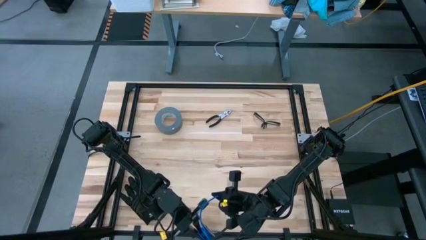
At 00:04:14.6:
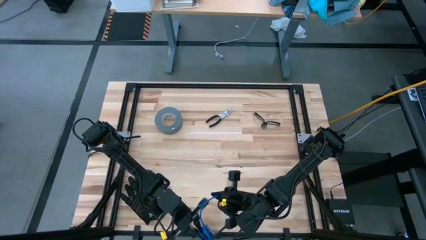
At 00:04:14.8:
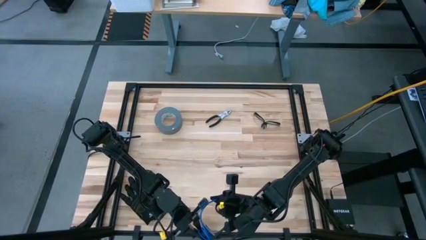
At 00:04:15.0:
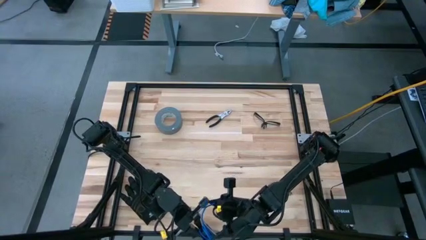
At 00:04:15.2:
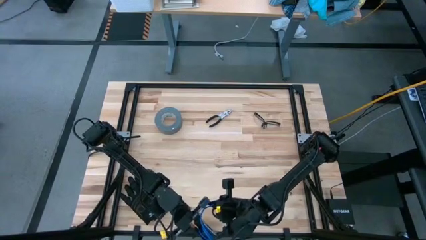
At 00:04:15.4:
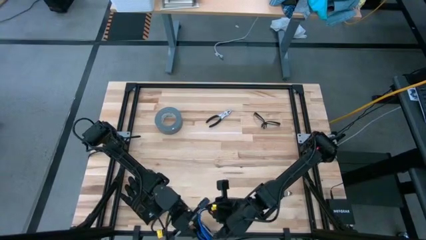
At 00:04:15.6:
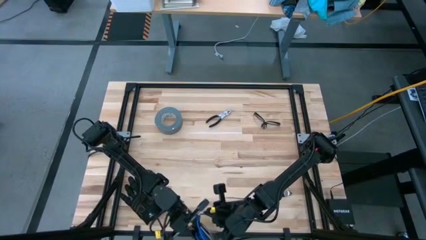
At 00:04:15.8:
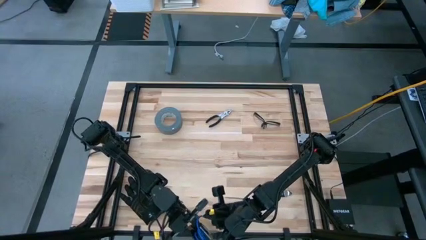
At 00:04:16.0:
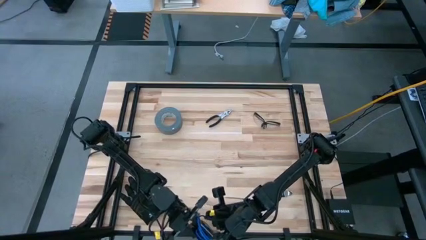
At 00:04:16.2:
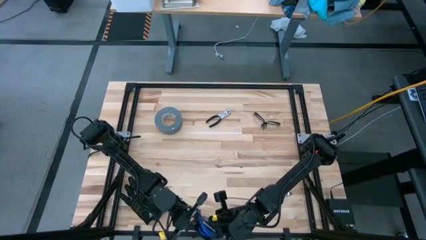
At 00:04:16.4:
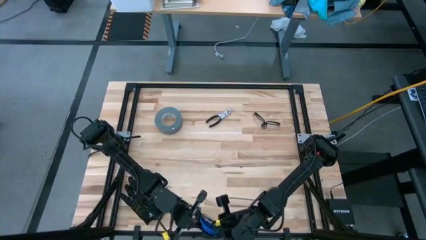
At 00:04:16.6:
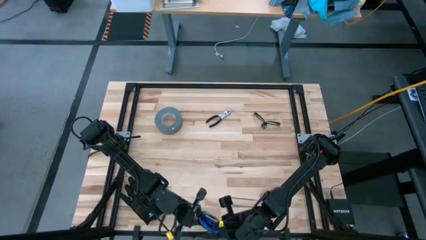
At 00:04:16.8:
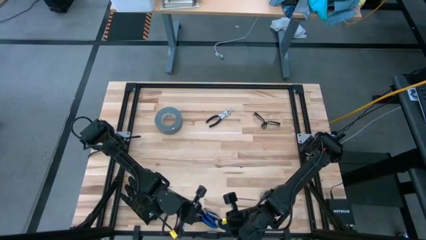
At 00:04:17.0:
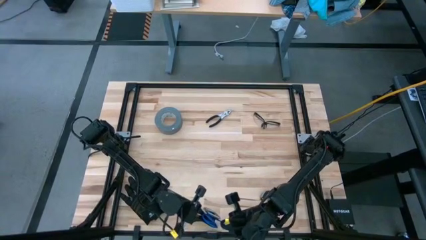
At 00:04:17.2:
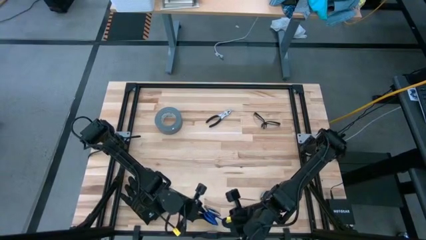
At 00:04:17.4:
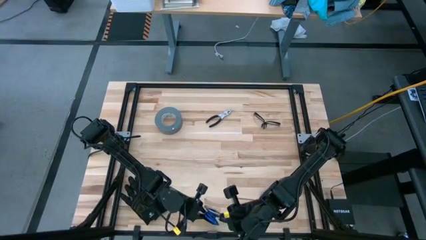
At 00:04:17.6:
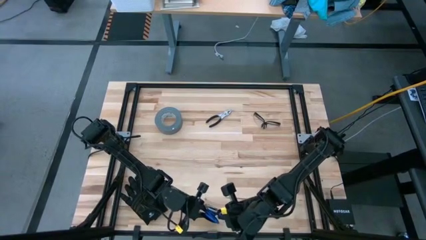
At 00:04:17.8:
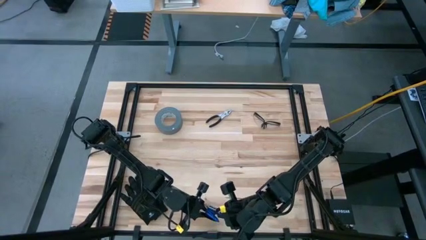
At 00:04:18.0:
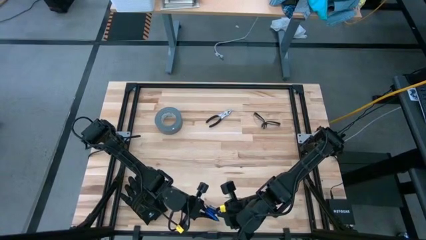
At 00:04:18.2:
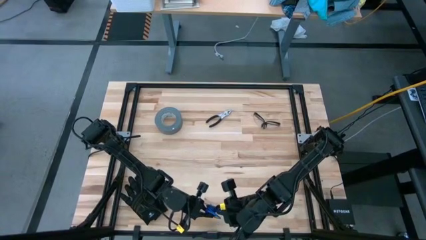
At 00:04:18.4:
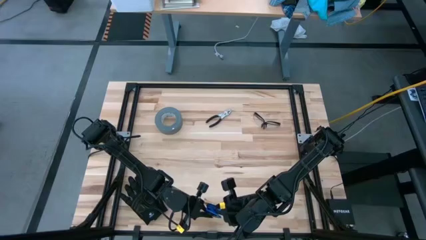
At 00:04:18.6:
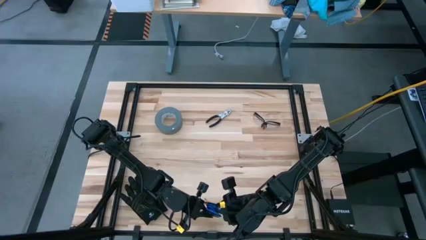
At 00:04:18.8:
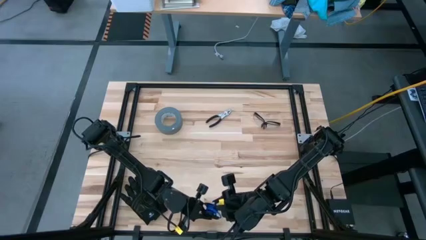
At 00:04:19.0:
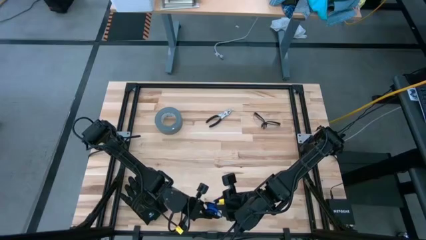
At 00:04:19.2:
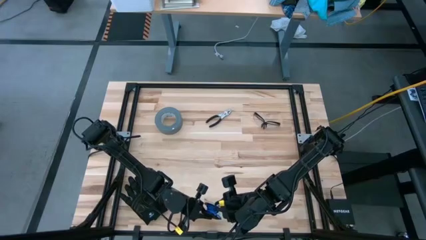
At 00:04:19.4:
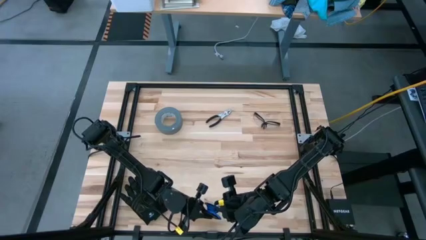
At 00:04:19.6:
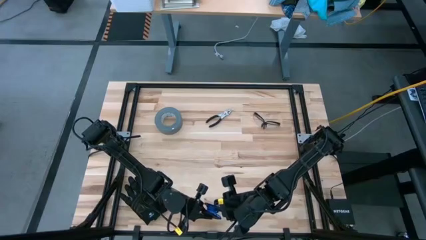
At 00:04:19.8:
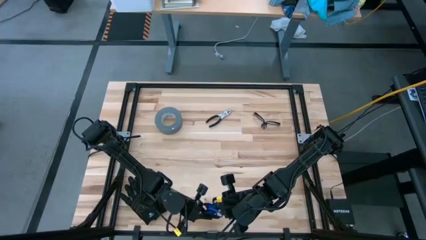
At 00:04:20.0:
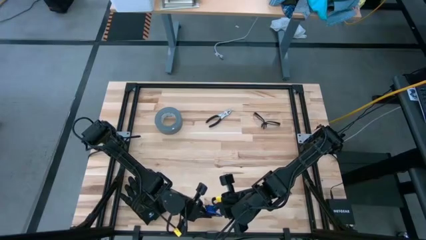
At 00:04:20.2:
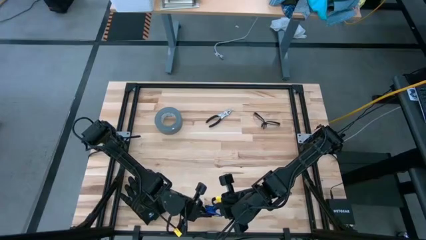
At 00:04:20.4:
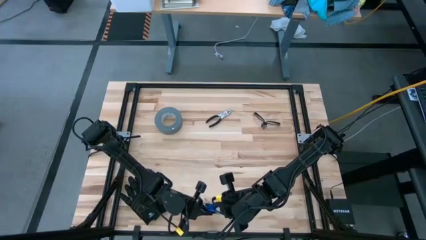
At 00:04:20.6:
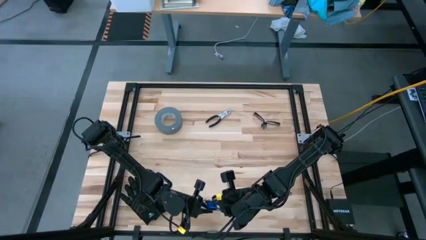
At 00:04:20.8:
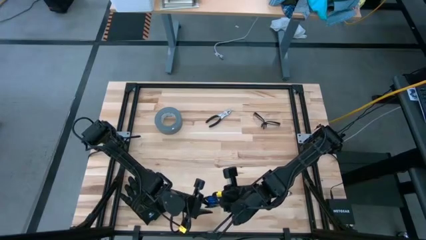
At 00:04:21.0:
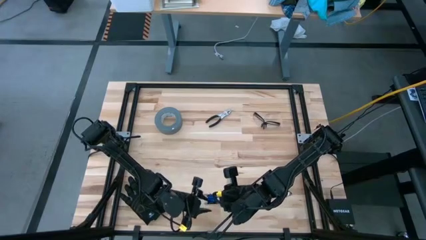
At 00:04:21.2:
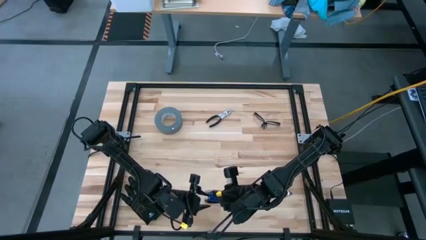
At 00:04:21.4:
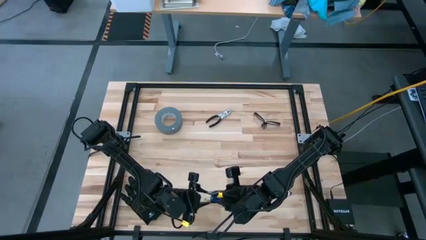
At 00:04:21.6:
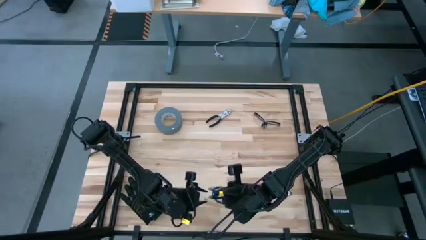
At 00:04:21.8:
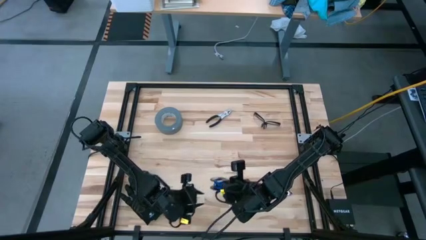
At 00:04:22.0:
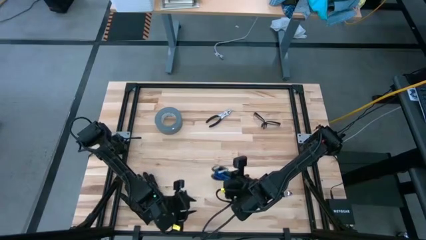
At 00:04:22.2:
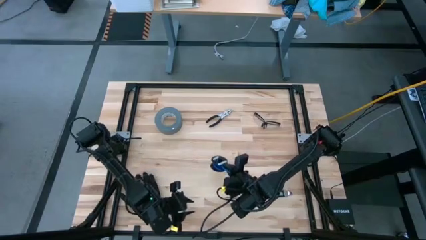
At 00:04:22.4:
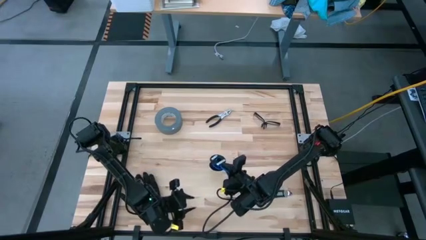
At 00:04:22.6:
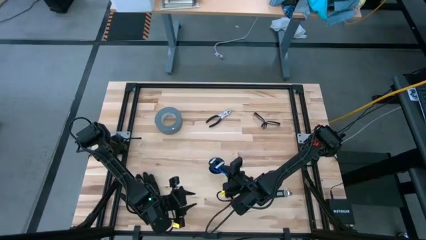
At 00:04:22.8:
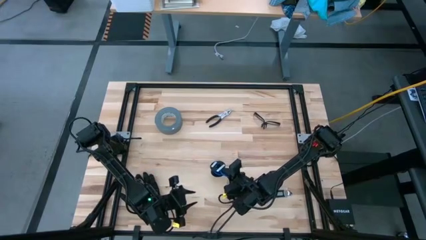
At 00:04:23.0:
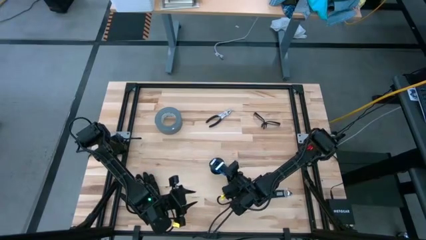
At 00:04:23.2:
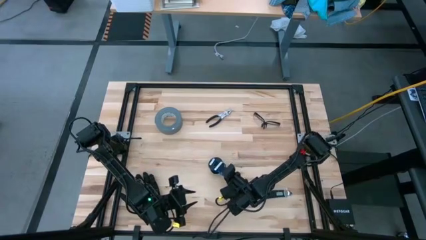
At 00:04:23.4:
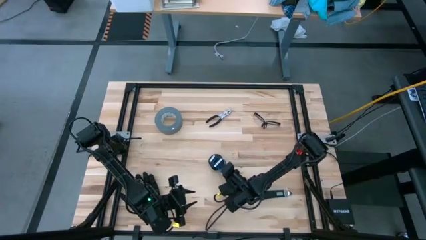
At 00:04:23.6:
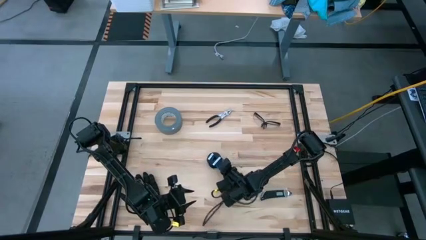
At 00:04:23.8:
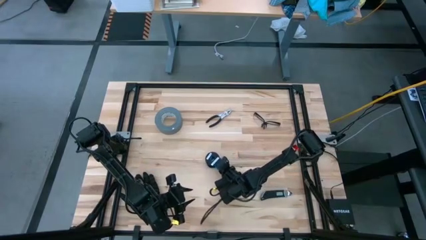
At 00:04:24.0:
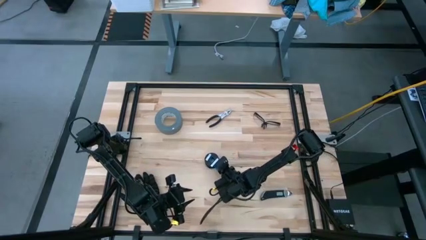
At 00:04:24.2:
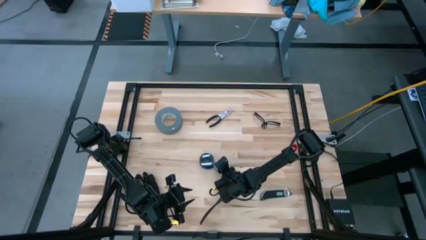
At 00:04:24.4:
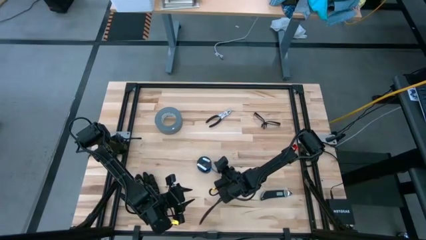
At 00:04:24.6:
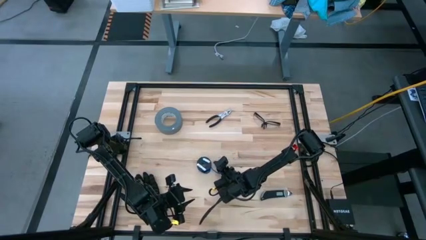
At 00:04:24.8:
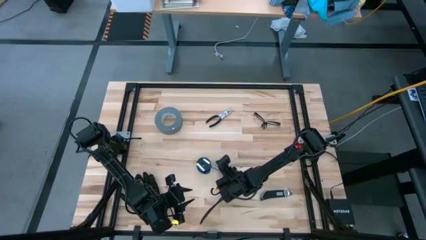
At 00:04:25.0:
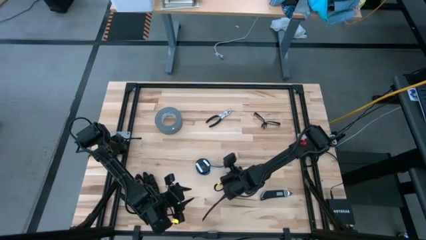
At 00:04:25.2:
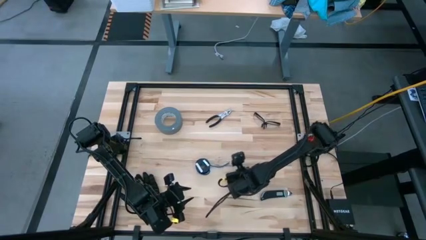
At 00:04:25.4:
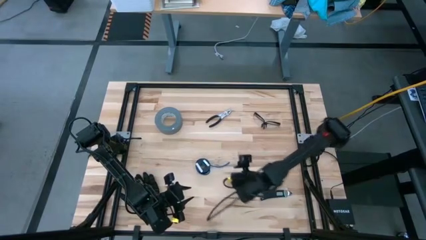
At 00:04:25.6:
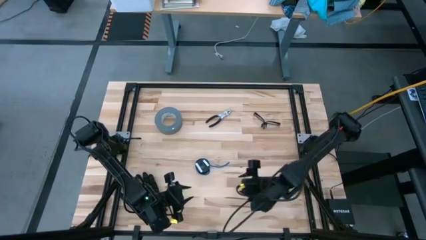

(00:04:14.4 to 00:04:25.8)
Task: Coil cords
Coil the blue wire cable onto the black spool

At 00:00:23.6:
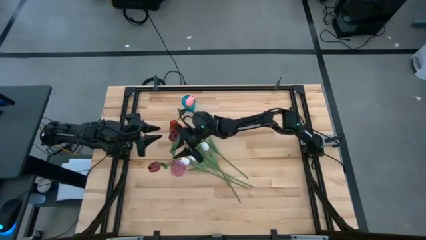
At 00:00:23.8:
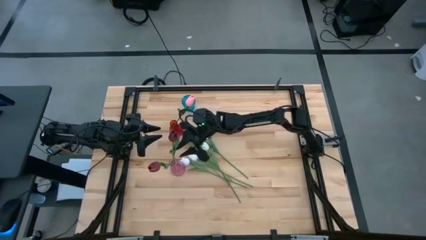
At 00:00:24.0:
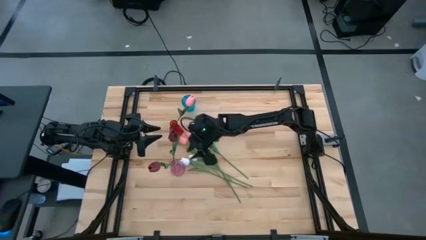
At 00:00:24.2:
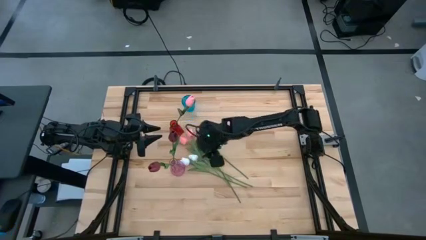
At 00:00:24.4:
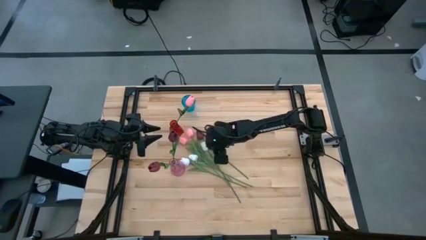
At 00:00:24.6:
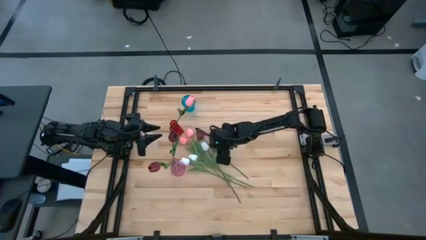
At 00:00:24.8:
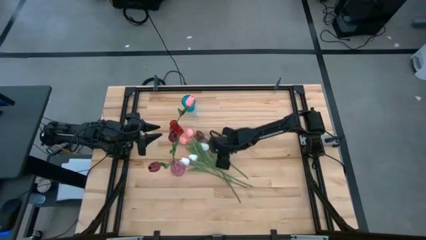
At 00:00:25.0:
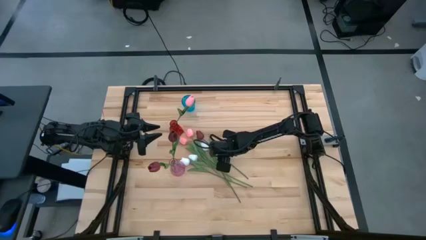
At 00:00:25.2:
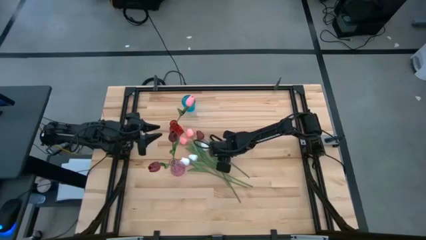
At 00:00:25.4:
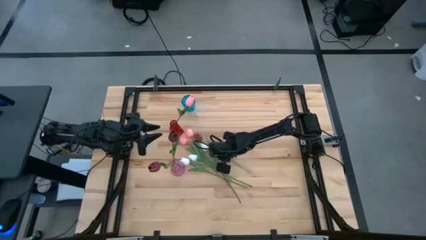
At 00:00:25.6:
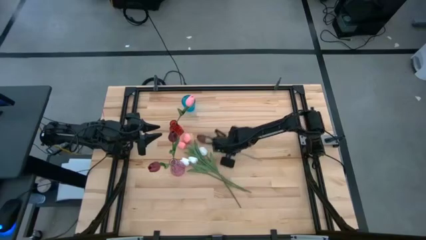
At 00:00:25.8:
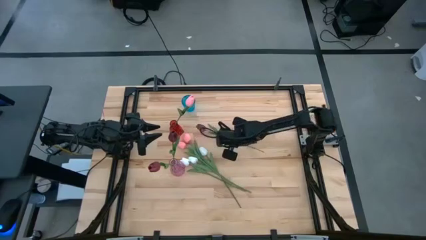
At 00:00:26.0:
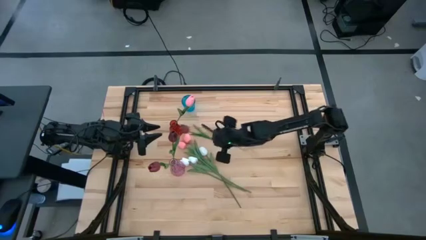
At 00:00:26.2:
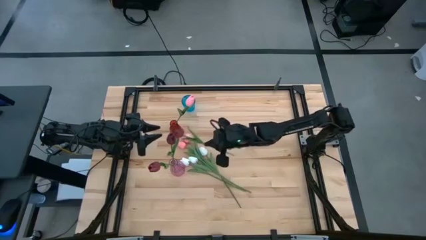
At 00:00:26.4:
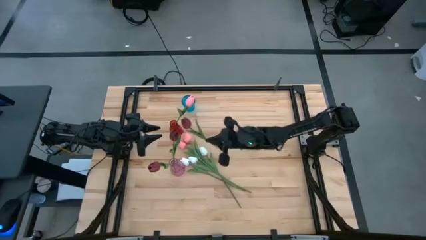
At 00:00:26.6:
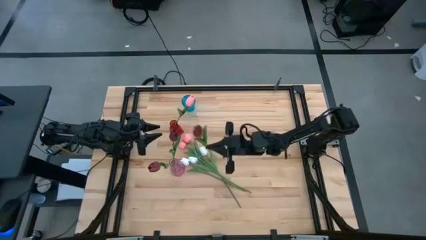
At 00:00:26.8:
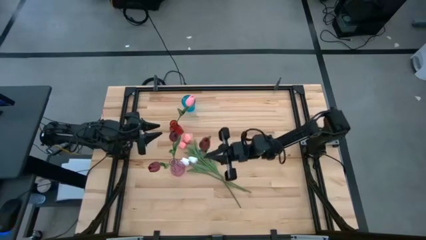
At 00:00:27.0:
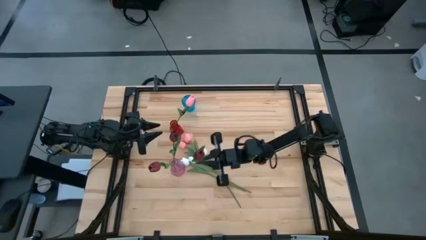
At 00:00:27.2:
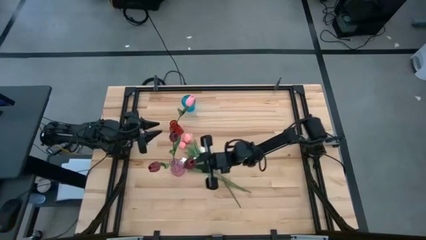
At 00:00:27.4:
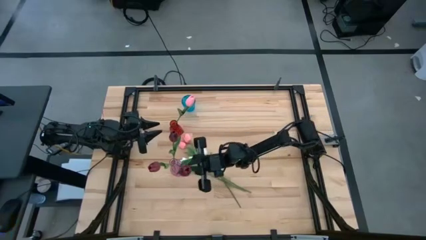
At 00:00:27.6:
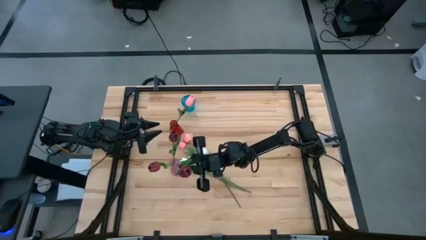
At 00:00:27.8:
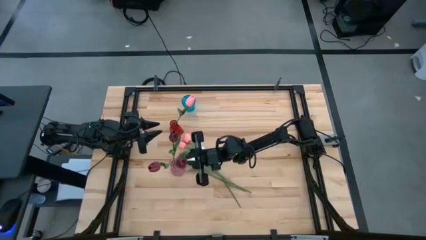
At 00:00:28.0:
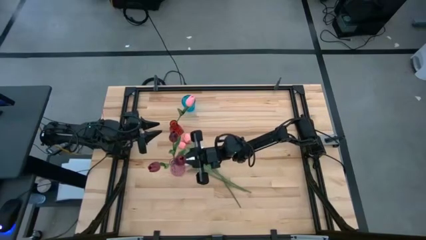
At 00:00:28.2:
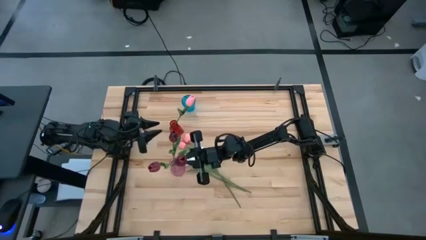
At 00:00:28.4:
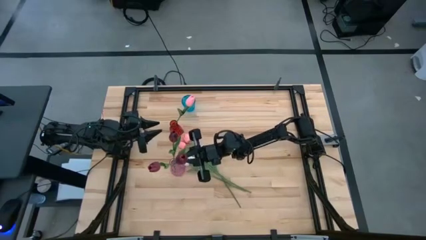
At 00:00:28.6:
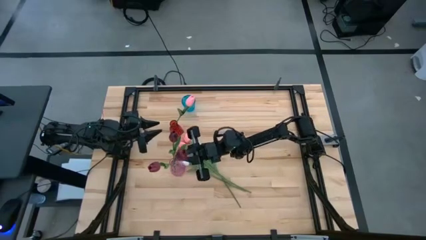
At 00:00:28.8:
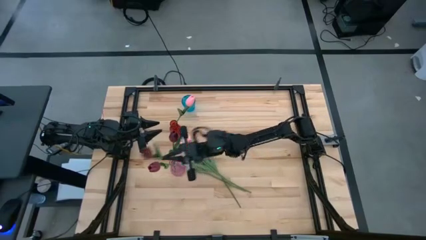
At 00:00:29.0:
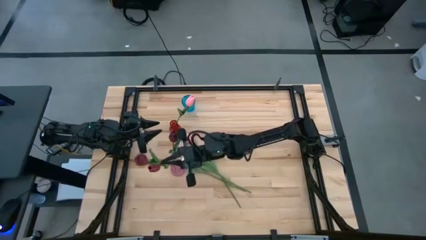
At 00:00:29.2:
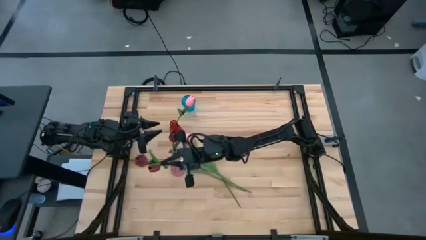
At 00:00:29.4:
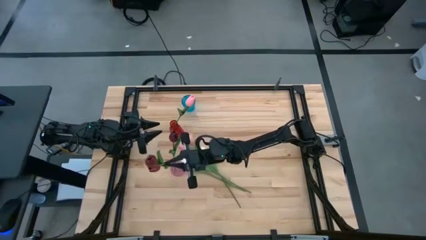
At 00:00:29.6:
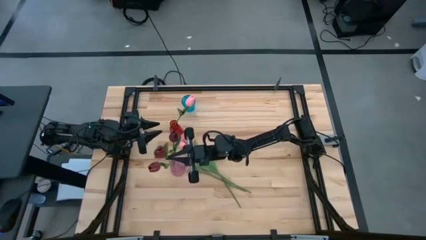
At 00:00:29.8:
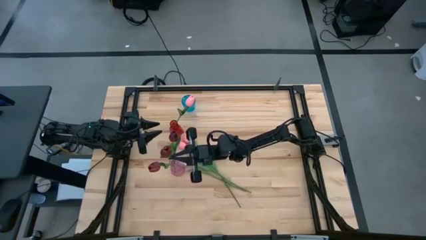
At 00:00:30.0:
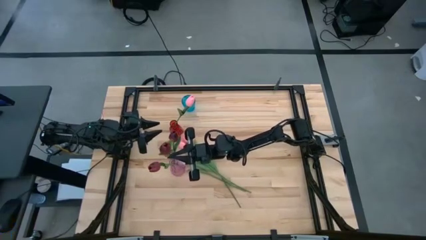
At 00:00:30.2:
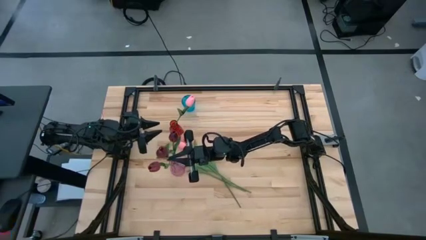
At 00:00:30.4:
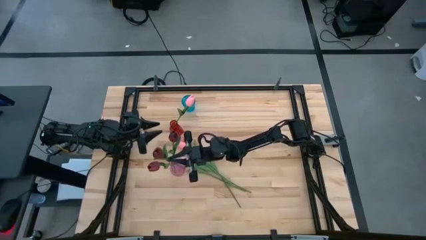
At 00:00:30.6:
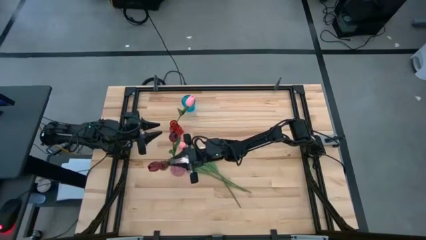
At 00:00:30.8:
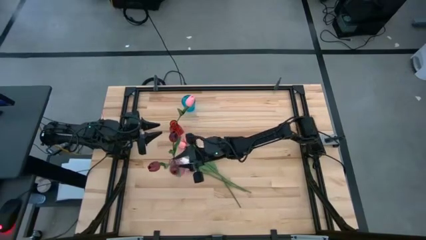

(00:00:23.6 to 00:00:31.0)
Task: Sort flowers into vase by color
Put the red tulip into the pink vase
